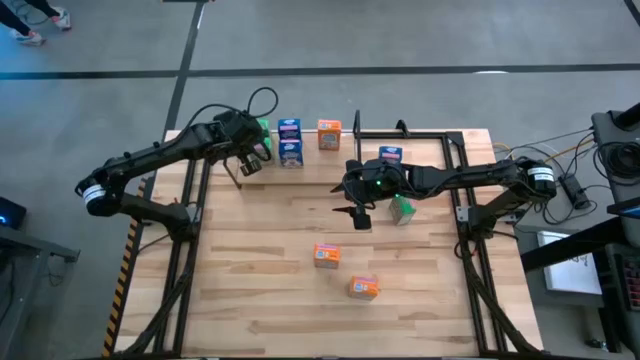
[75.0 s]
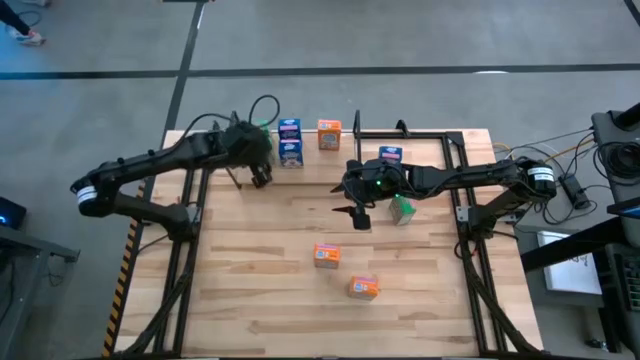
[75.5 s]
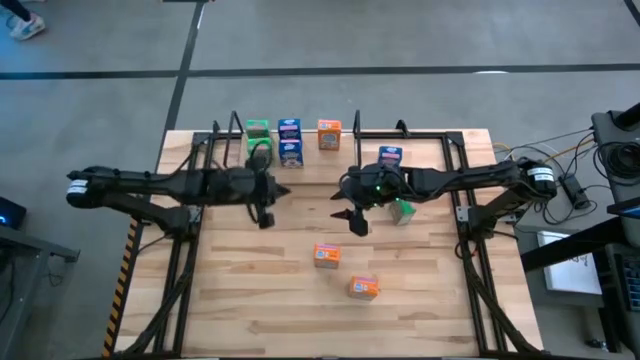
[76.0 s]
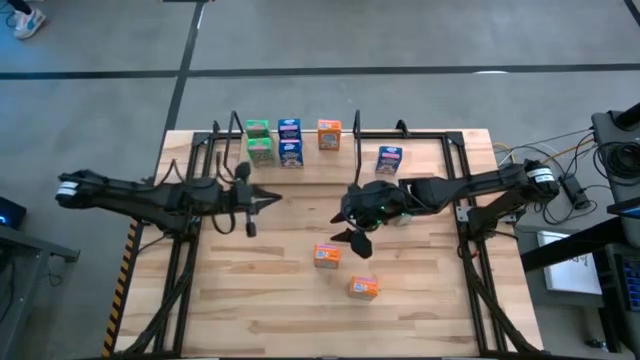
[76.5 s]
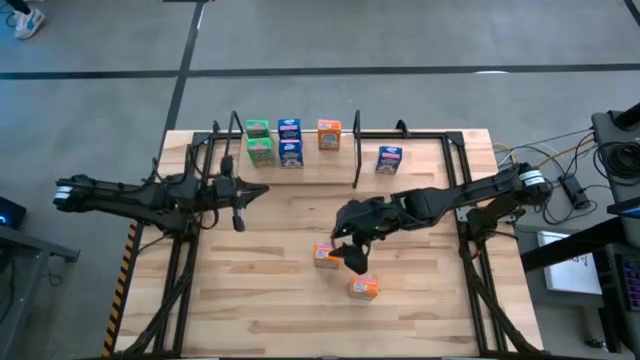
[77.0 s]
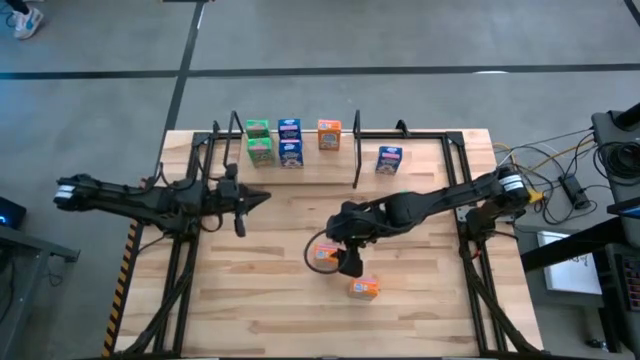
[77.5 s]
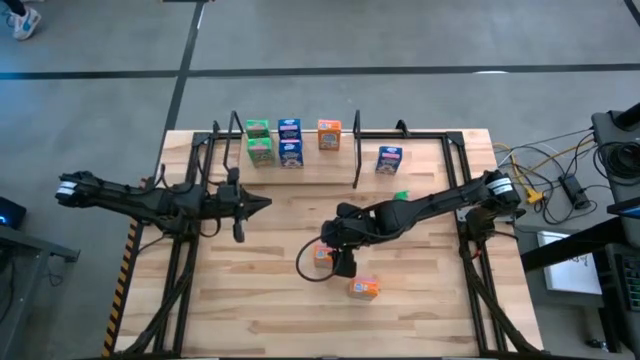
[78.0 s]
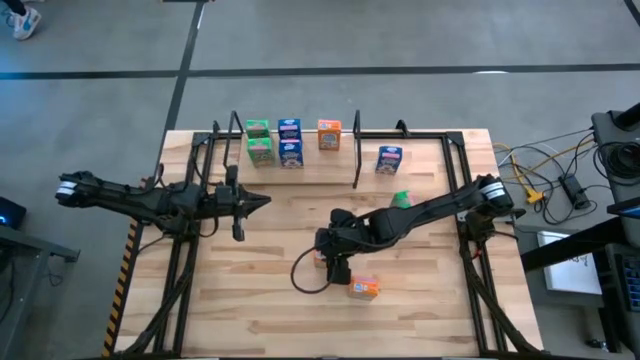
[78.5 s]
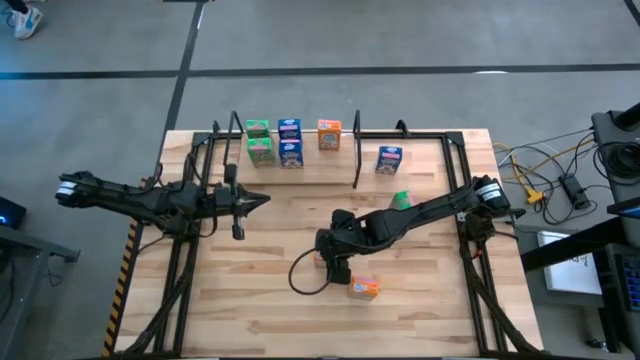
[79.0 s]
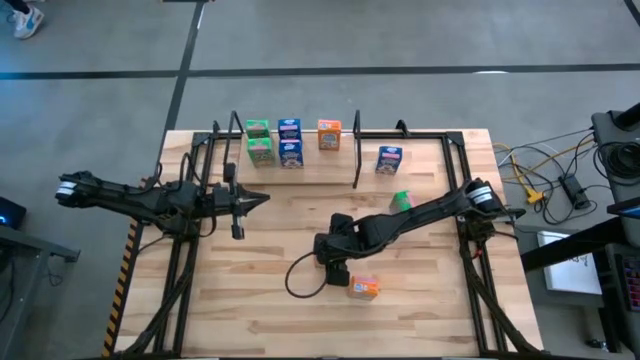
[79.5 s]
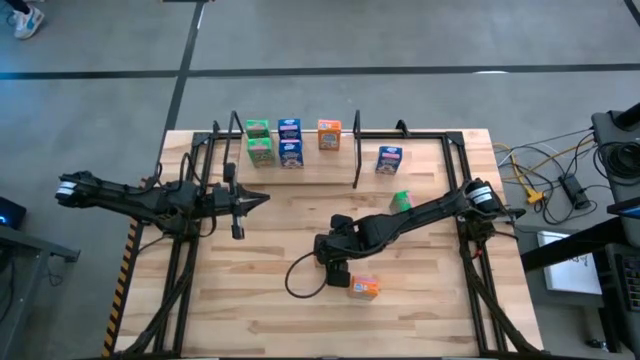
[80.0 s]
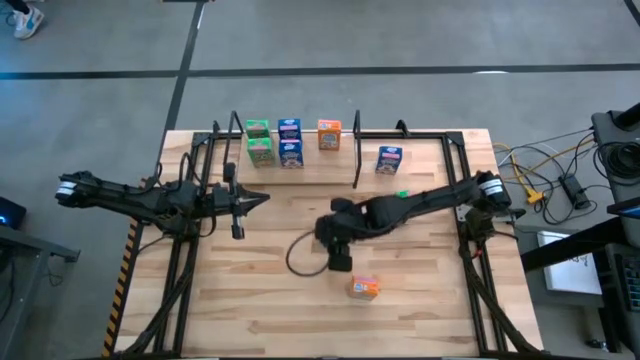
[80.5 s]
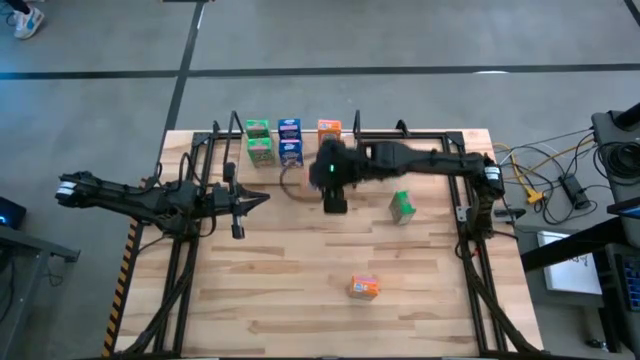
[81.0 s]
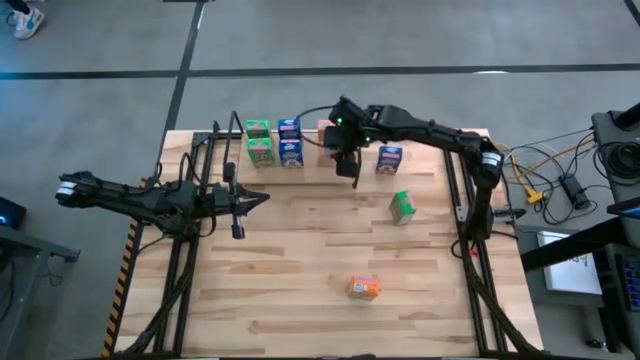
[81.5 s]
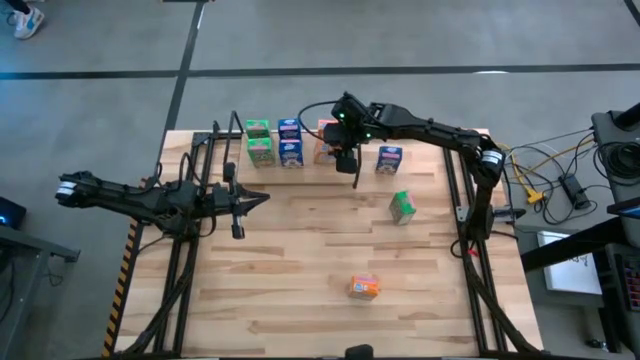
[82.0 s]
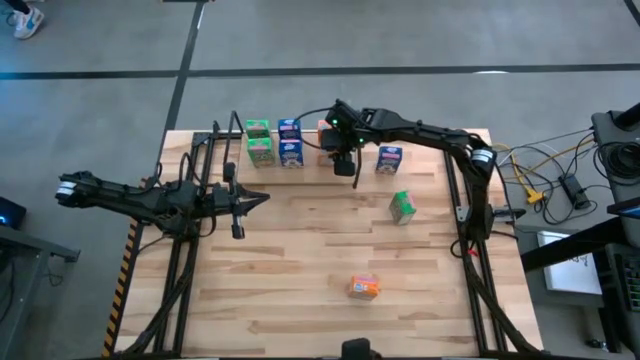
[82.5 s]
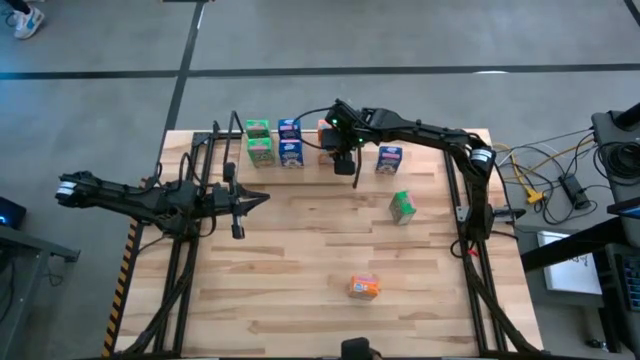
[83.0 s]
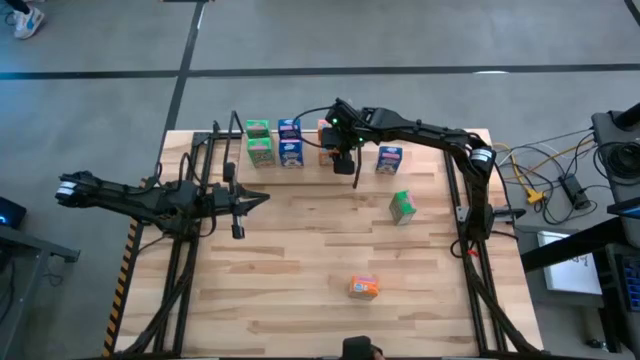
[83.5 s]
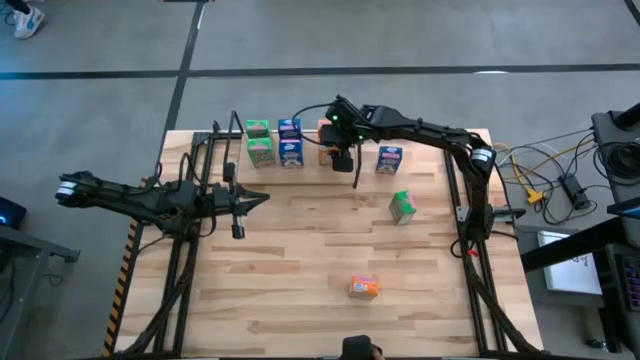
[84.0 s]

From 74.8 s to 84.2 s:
Task: Stack cereal on shelf
Put the top orange cereal box on the shelf aligned with the other orange cereal box

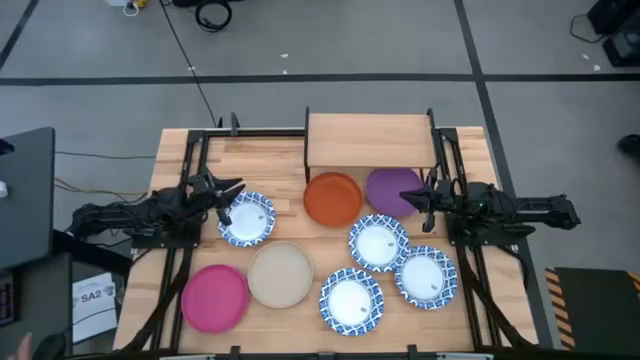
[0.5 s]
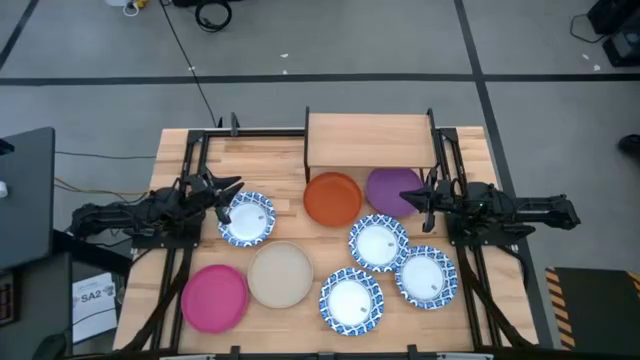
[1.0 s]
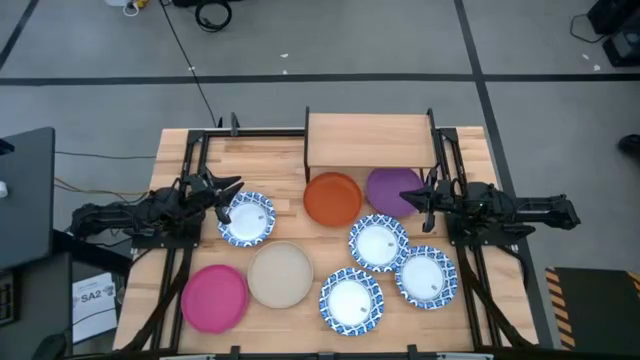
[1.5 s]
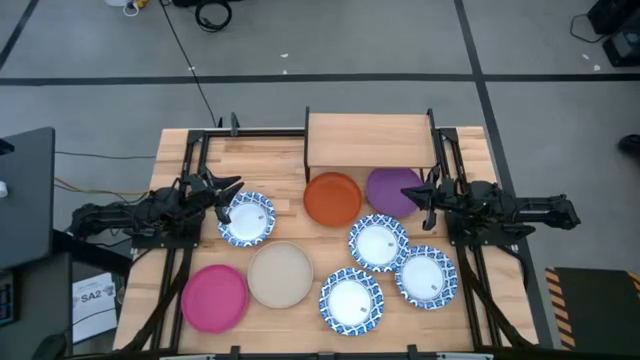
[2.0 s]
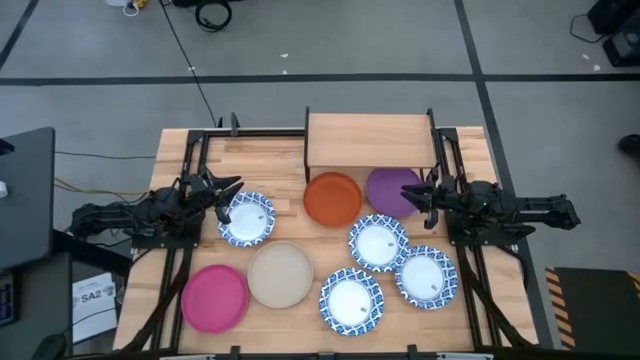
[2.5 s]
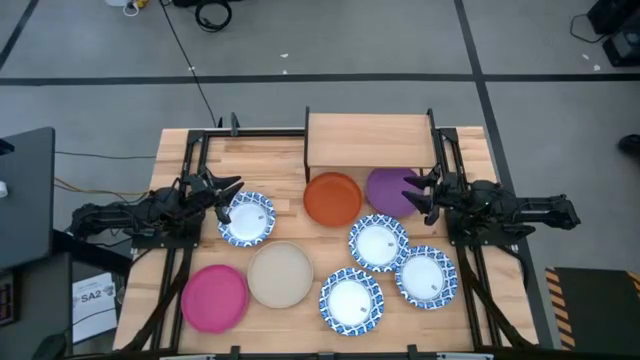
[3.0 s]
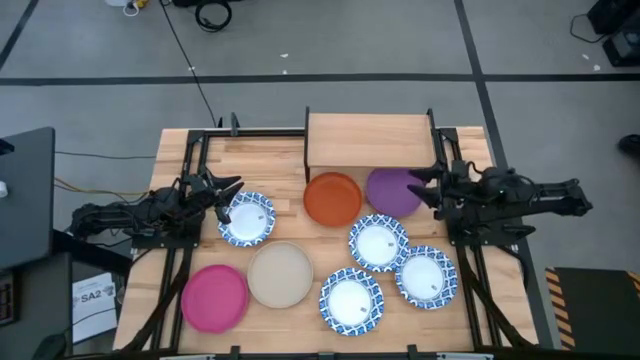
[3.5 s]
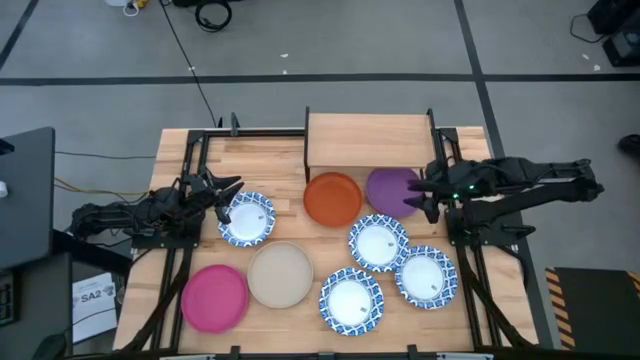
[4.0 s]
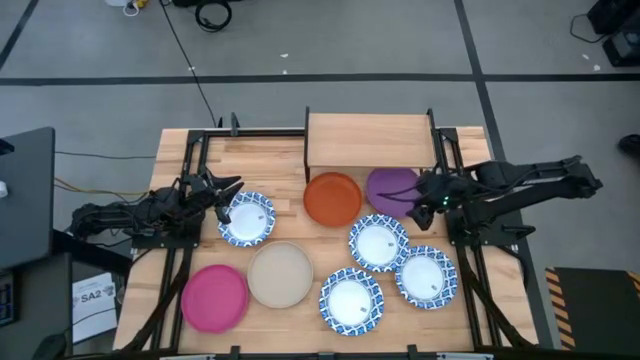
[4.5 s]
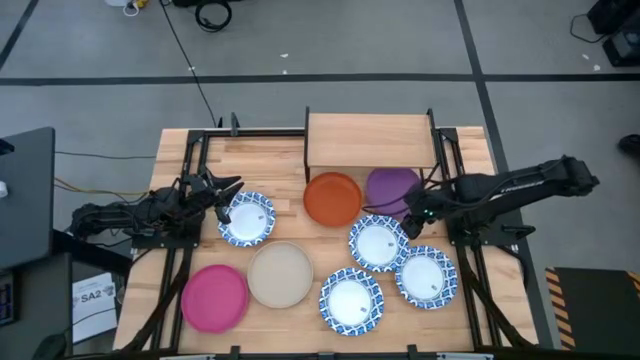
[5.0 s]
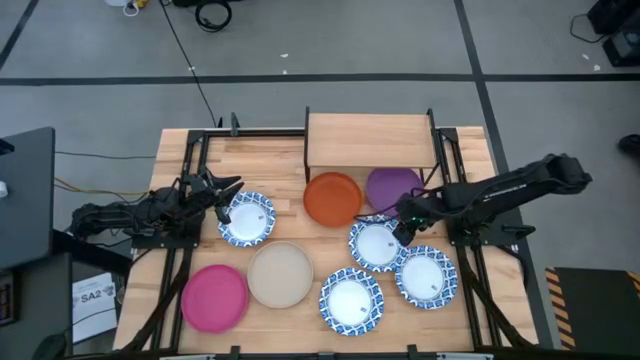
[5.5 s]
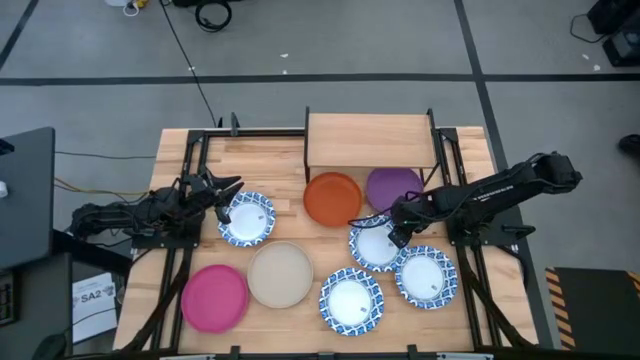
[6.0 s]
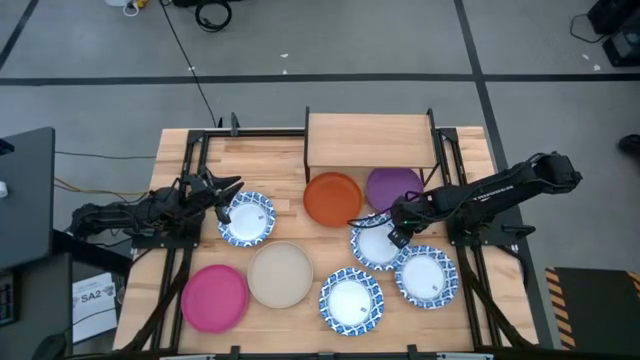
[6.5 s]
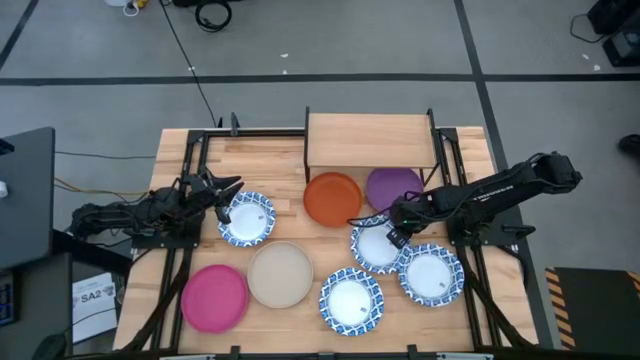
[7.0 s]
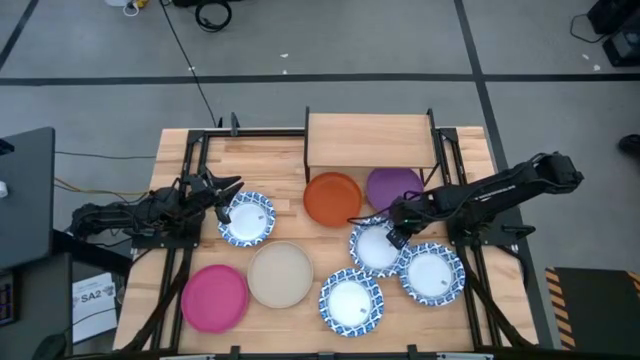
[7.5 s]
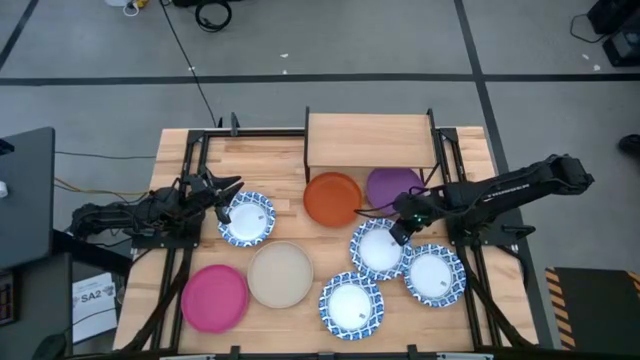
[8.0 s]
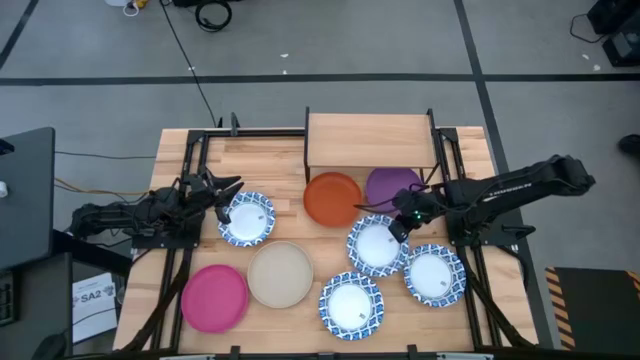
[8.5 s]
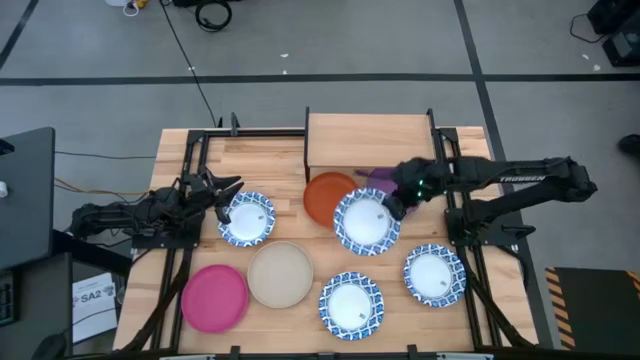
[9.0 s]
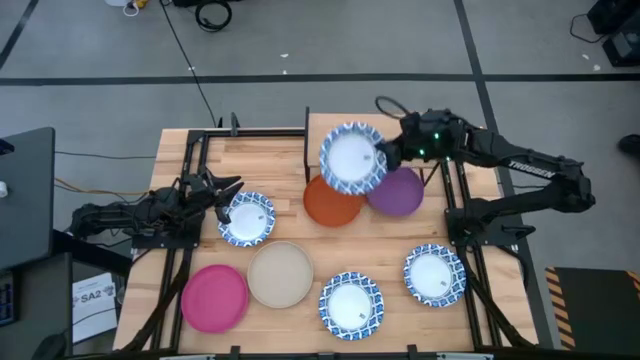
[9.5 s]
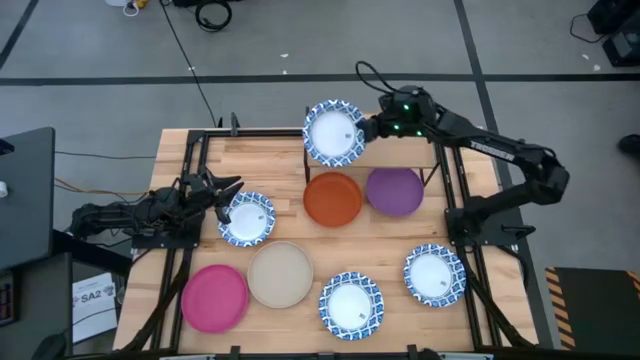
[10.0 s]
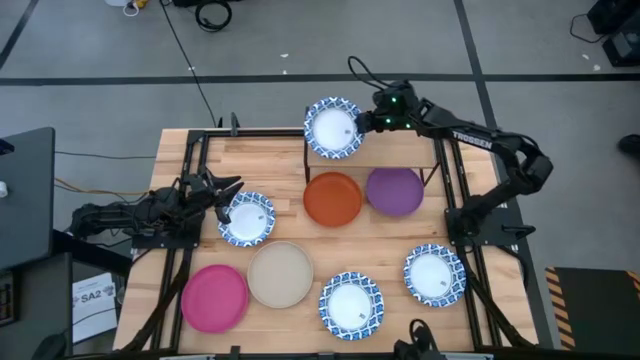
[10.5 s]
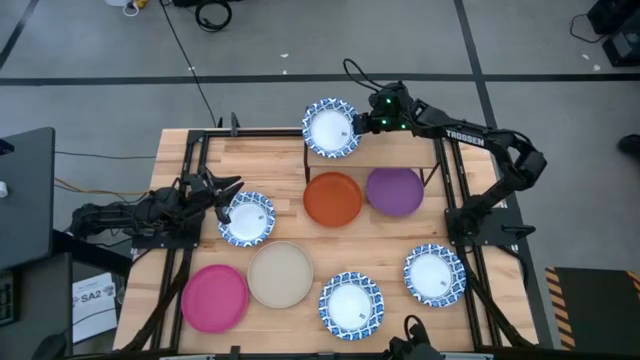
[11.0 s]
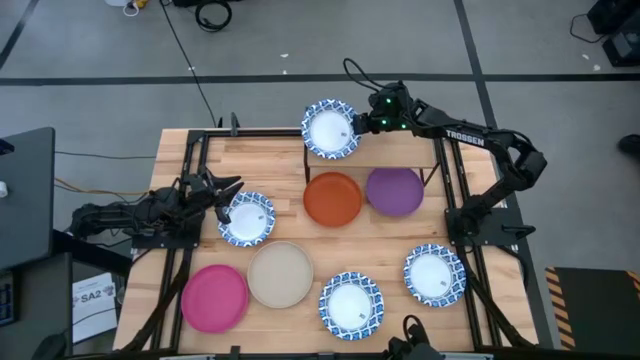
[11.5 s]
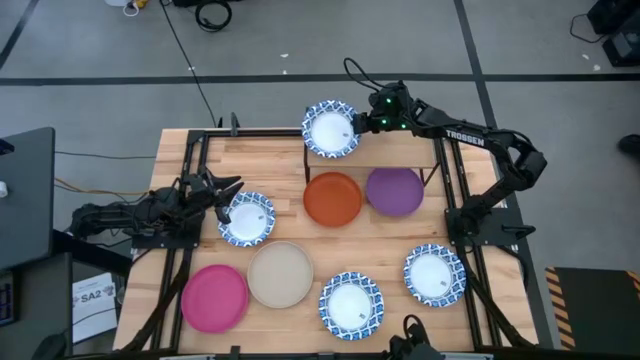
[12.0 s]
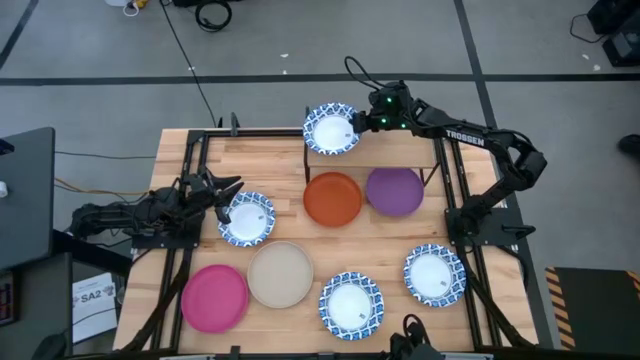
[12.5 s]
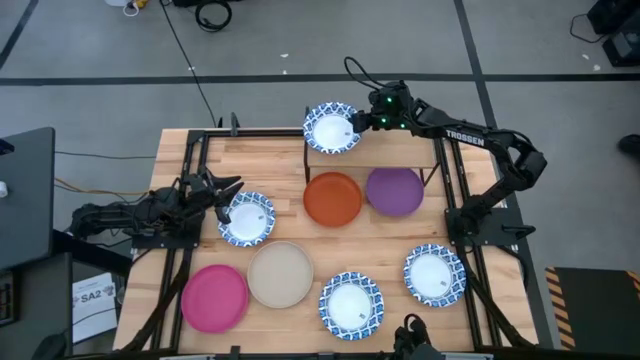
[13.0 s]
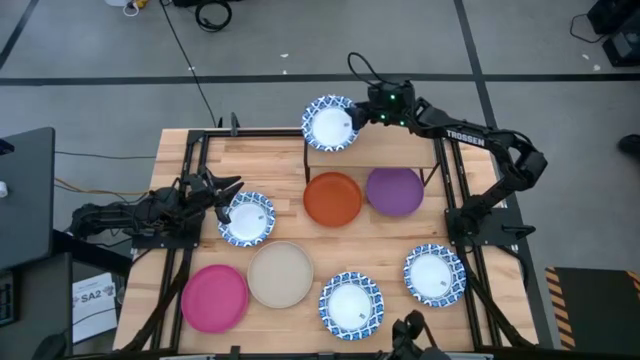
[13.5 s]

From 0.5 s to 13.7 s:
Task: Place and stack plates onto a shelf
Put the white plate on the shelf
